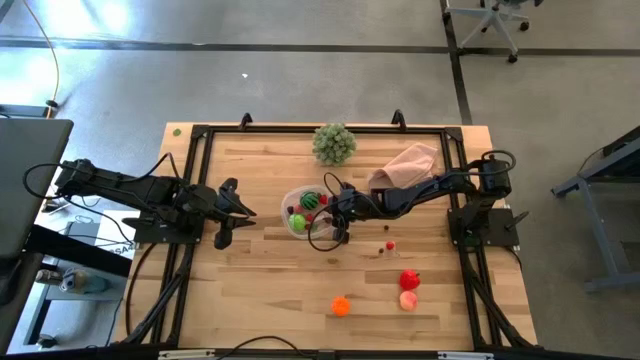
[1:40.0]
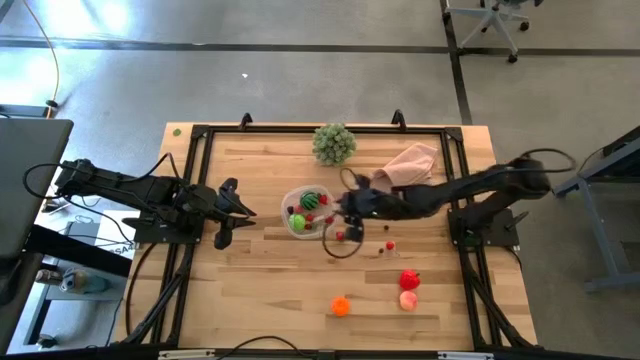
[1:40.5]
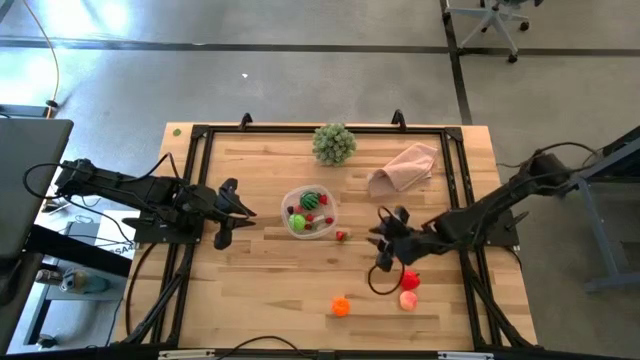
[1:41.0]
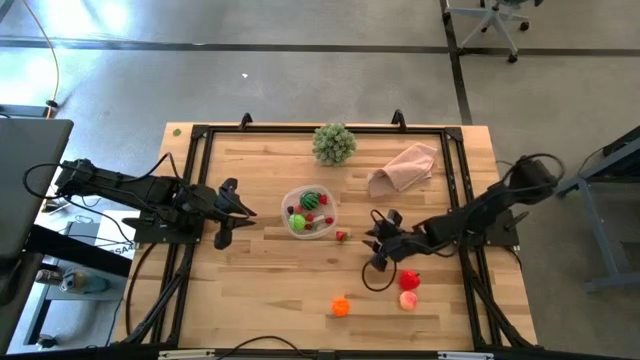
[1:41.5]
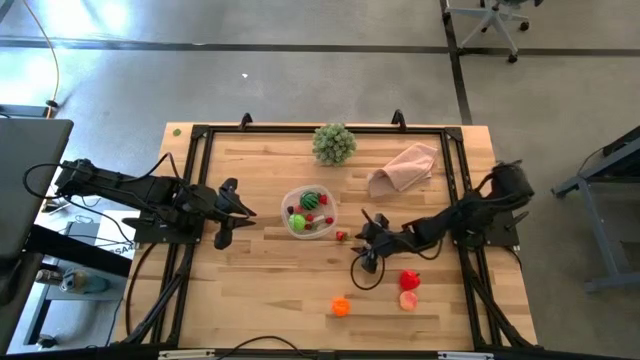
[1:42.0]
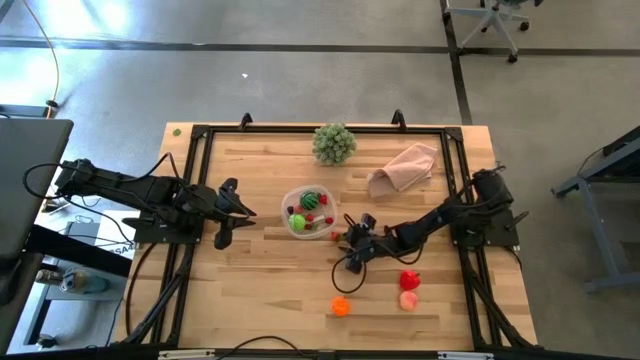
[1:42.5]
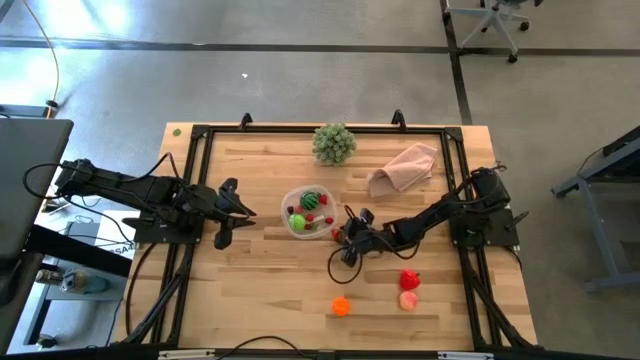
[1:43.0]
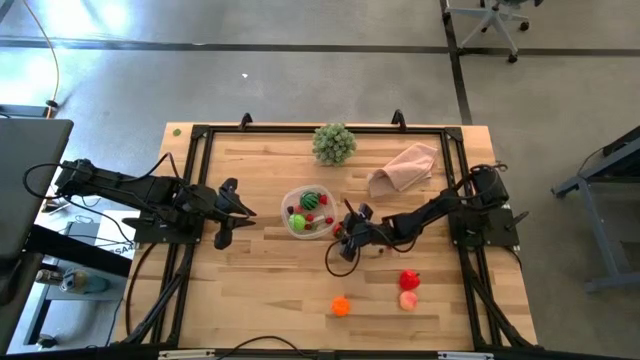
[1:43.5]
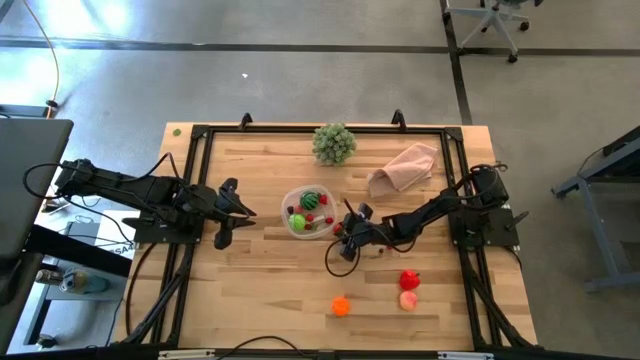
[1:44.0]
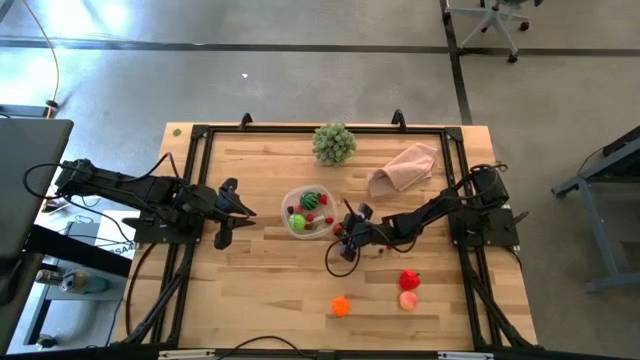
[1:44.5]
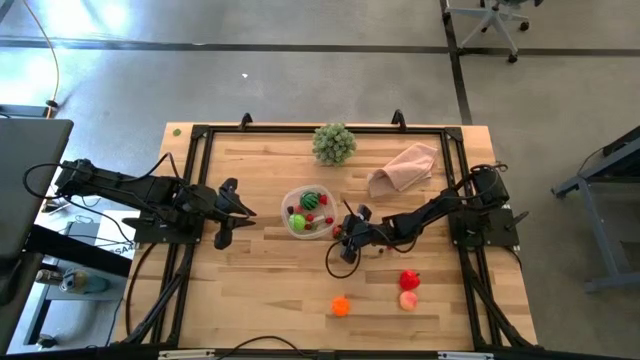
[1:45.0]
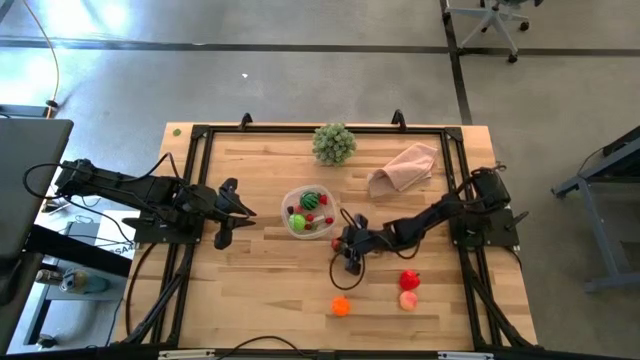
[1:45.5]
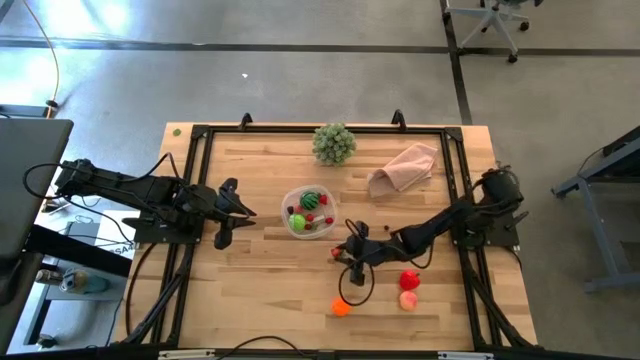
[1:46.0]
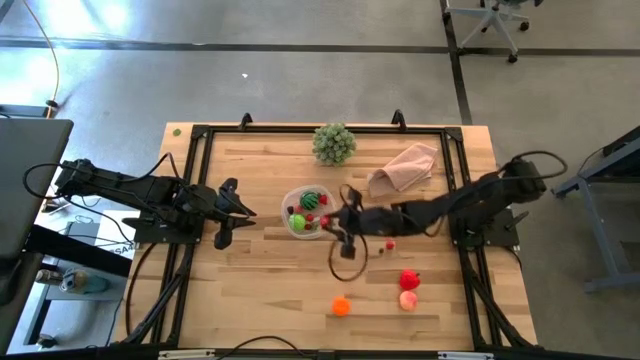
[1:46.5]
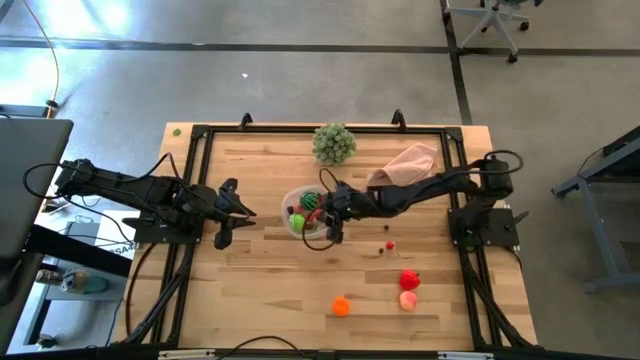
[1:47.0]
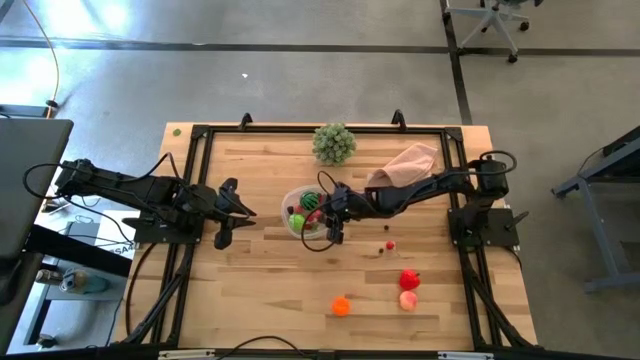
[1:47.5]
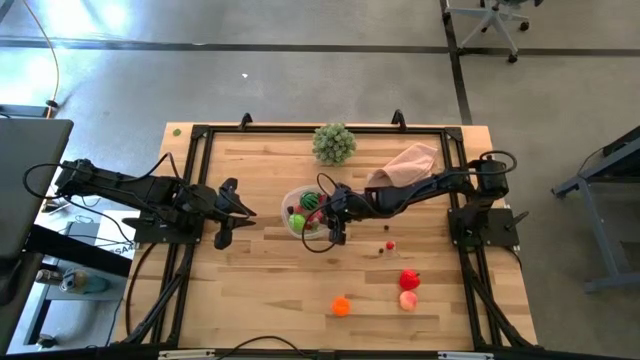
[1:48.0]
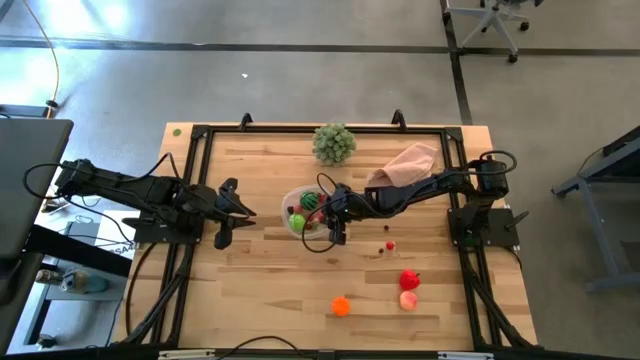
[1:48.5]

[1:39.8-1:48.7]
Task: Pick and placing Produce into tupperware
Put the red strawberry into the transparent bin

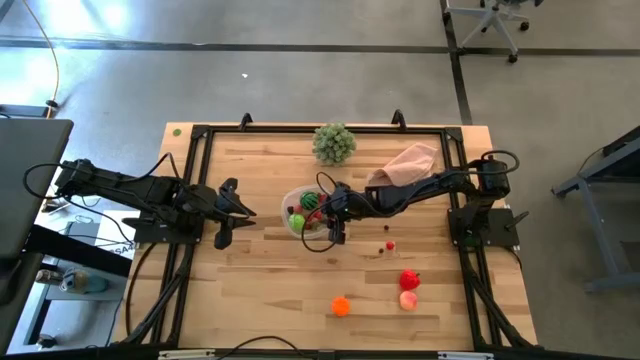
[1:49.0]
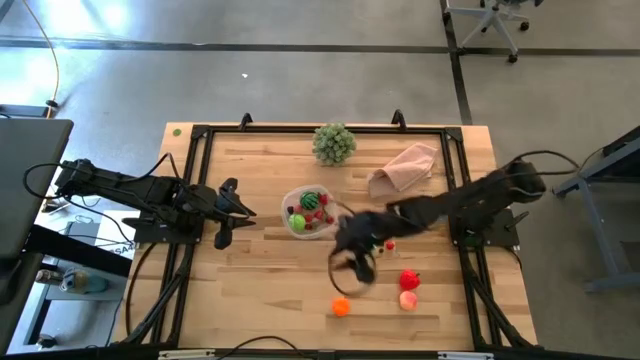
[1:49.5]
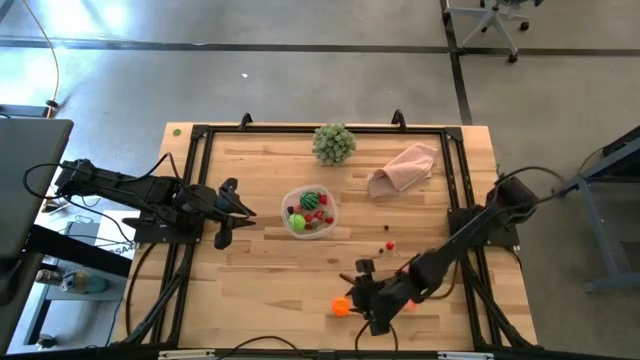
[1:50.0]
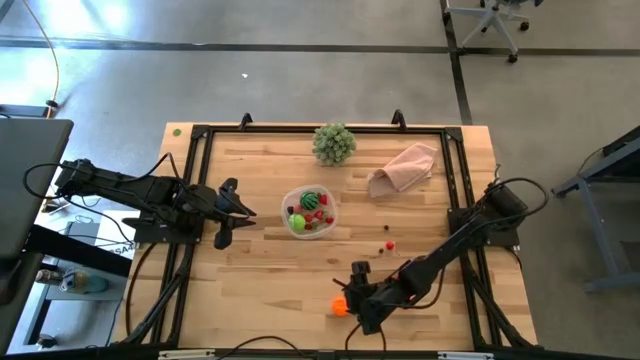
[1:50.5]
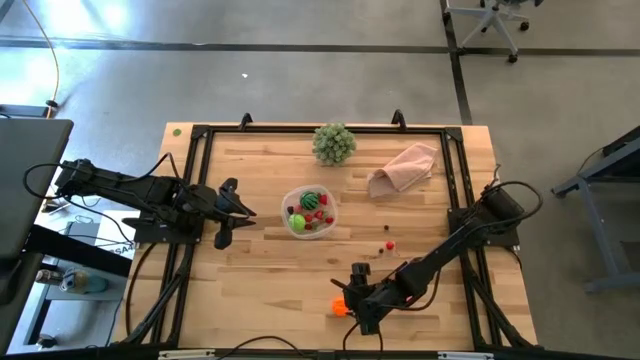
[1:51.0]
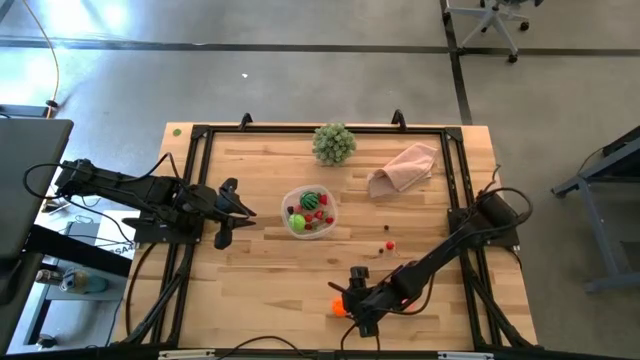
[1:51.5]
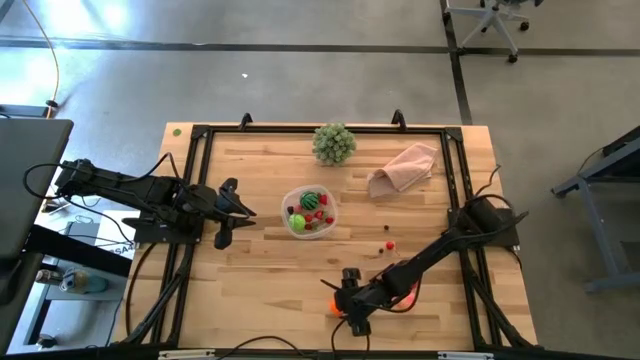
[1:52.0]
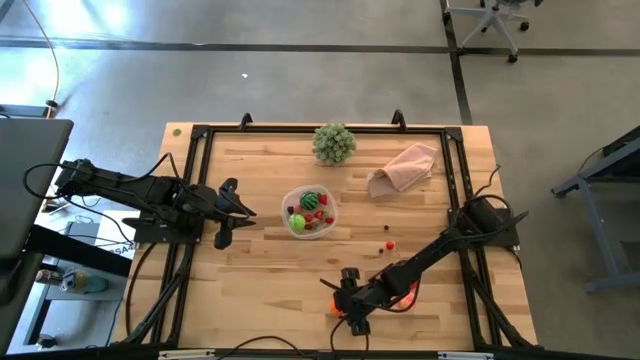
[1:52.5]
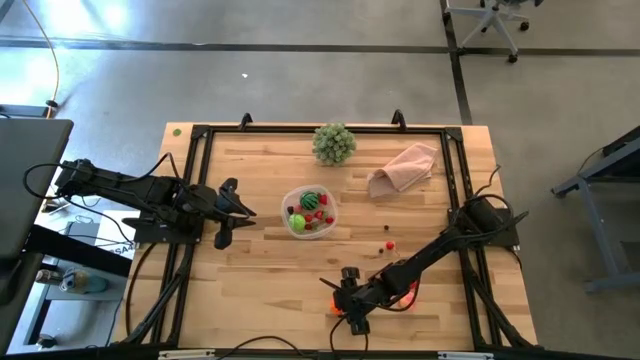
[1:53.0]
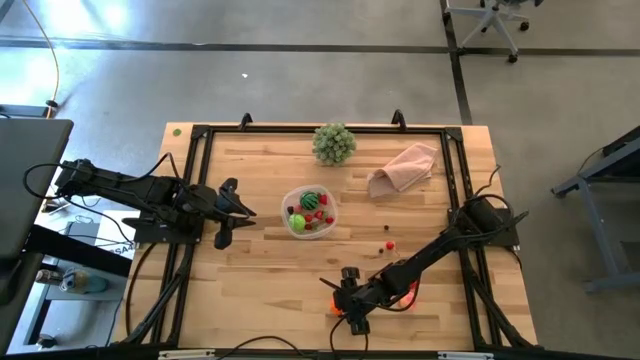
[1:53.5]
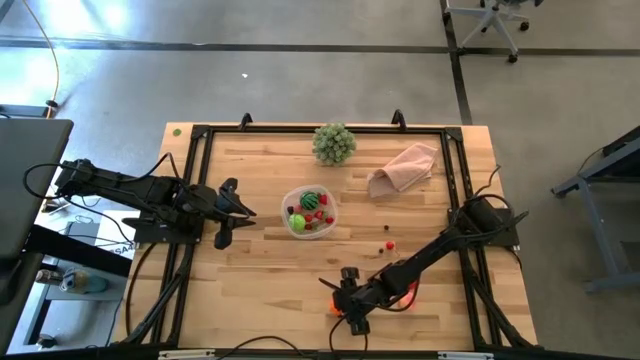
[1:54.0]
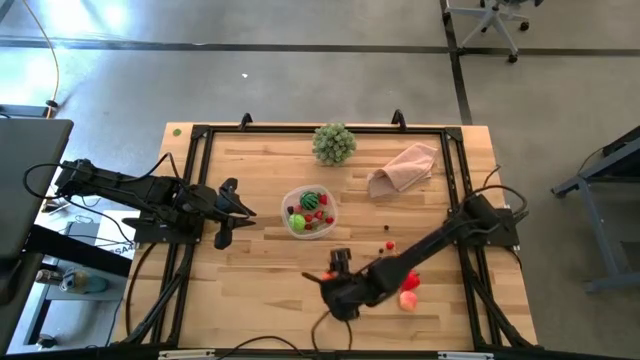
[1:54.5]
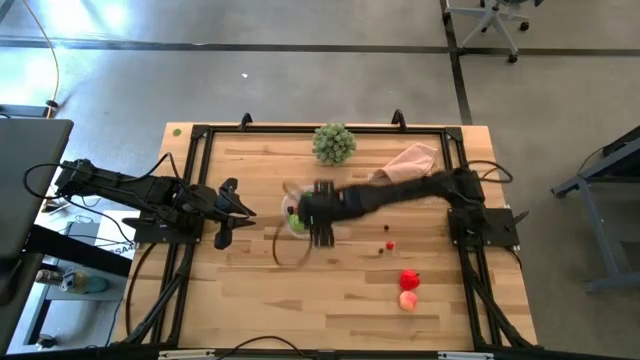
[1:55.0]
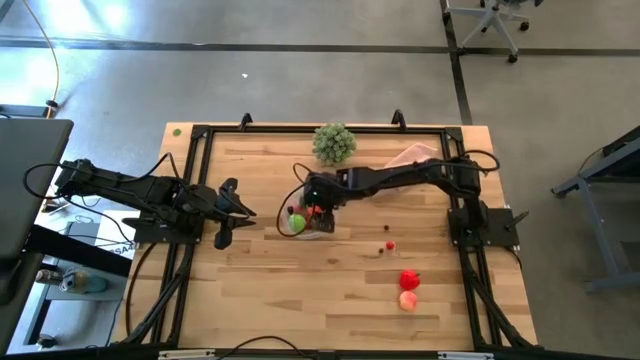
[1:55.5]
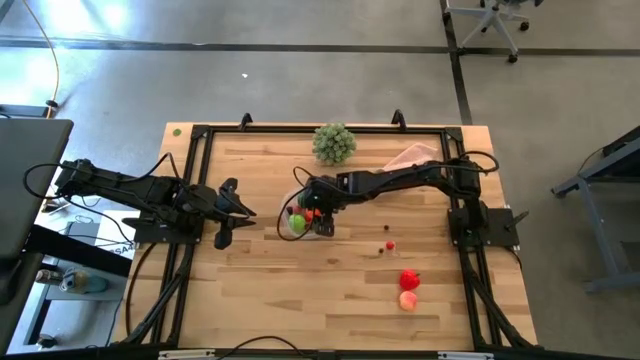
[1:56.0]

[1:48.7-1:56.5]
Put the orange pumpkin into the transparent bin

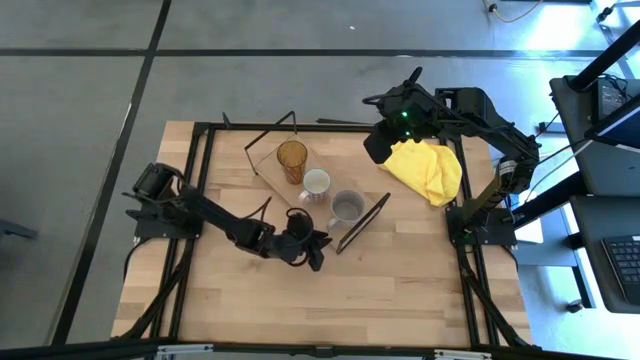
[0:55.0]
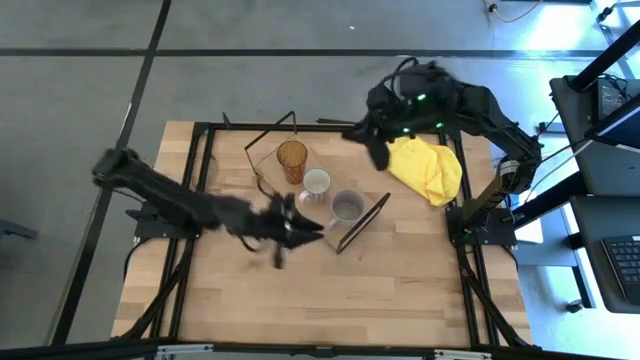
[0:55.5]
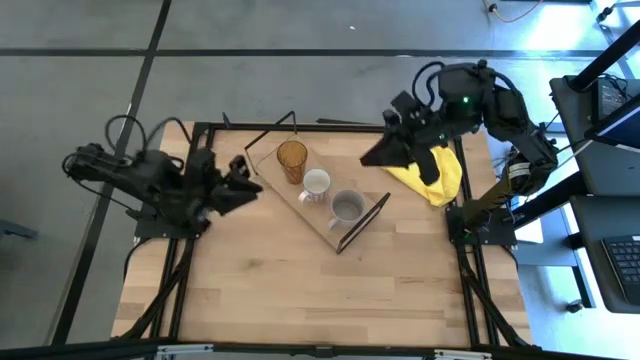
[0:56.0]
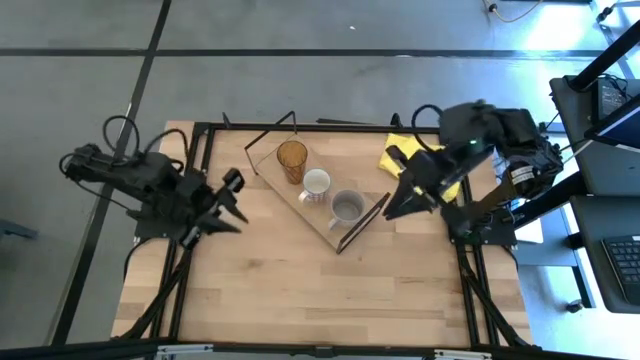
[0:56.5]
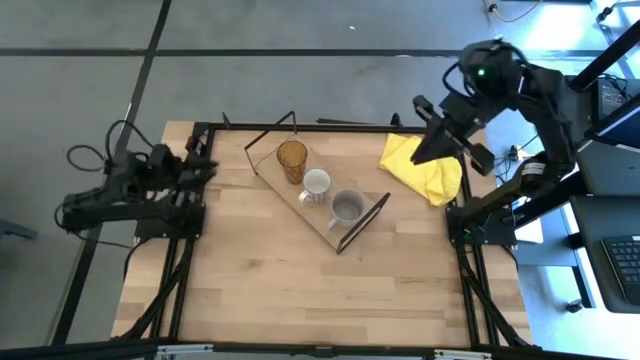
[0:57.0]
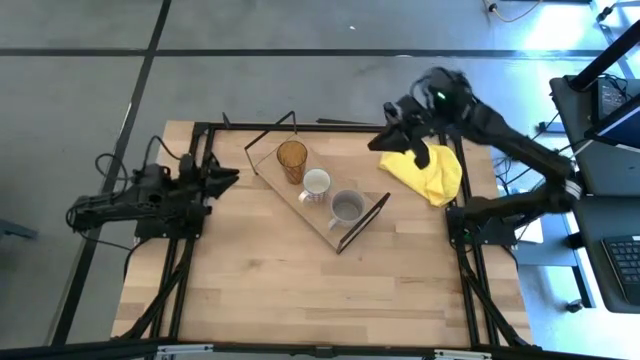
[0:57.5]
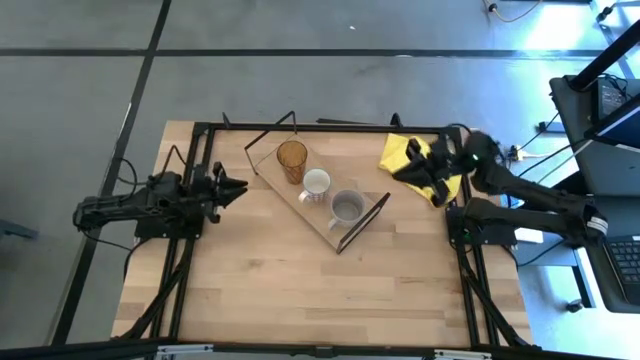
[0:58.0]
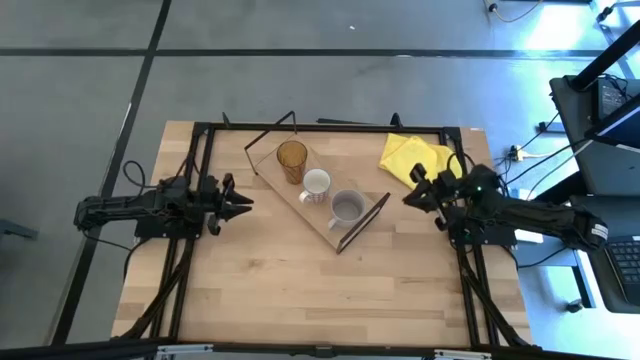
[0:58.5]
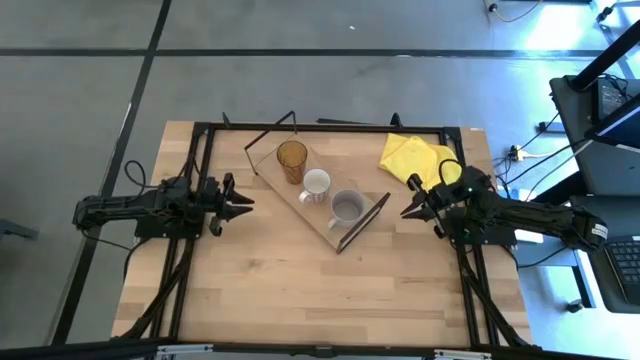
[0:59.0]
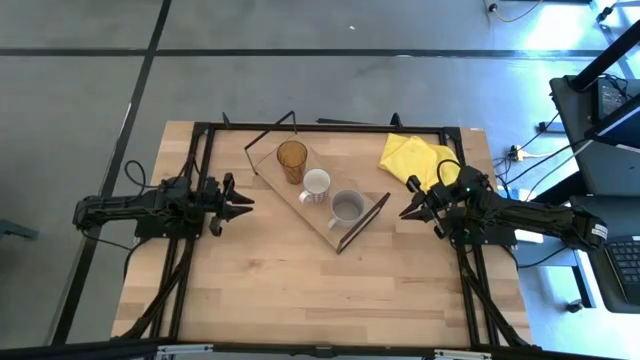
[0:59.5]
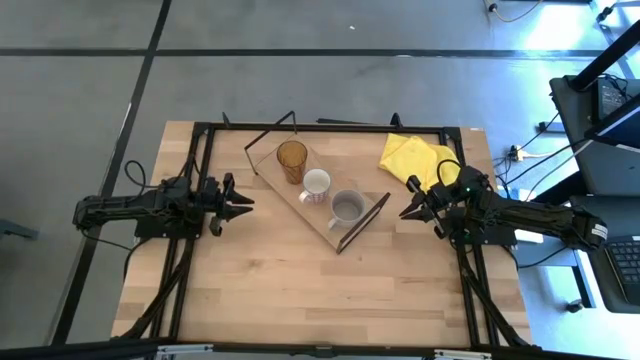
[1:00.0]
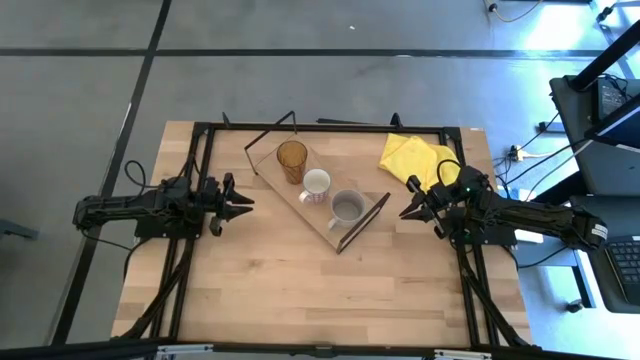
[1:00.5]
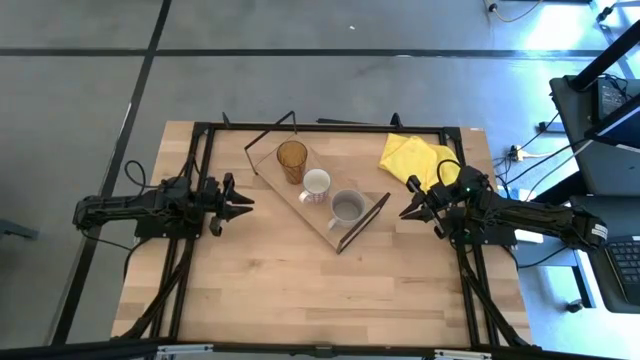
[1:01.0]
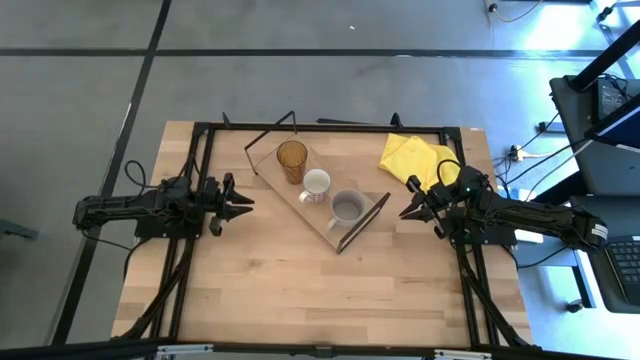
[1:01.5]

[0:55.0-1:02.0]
Task: Stack small to large cups/mugs on shelf
Return to Home Position
